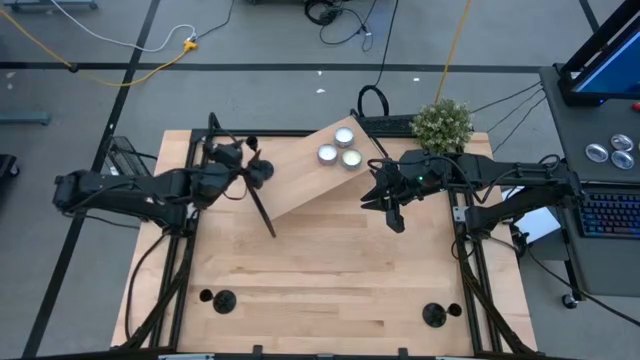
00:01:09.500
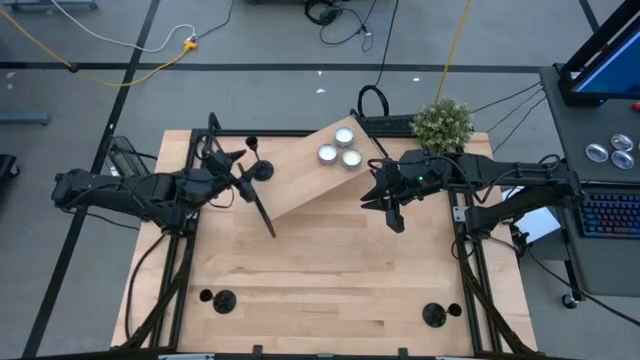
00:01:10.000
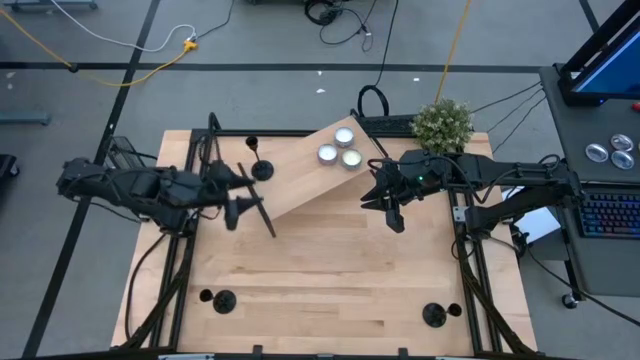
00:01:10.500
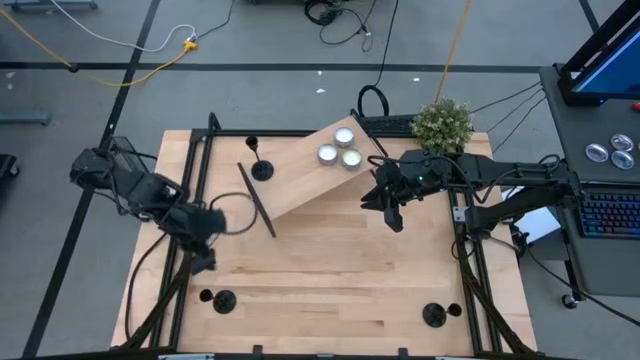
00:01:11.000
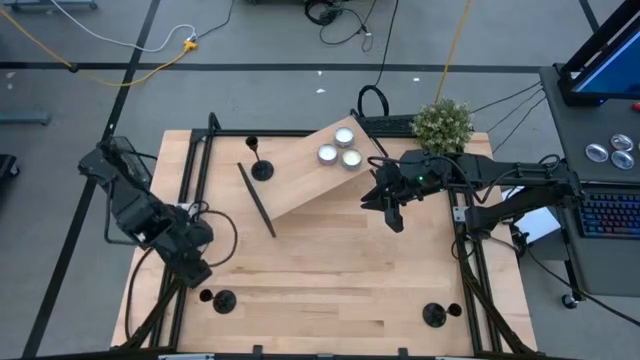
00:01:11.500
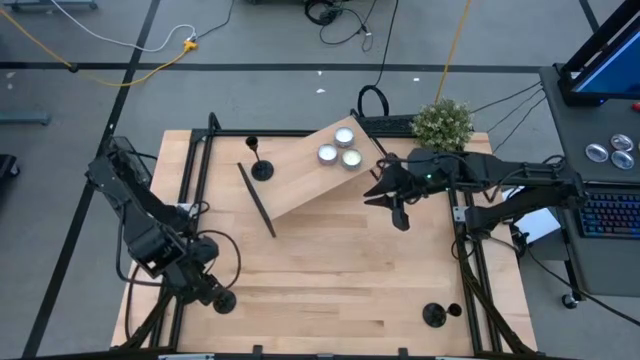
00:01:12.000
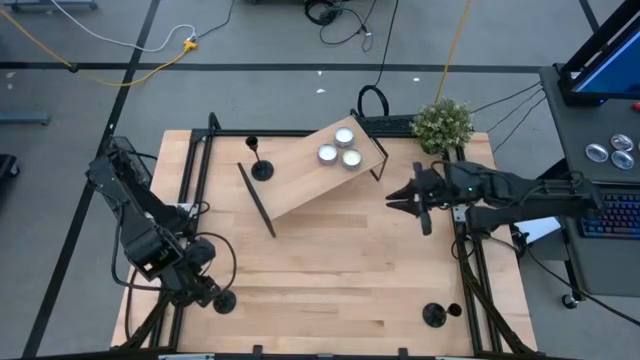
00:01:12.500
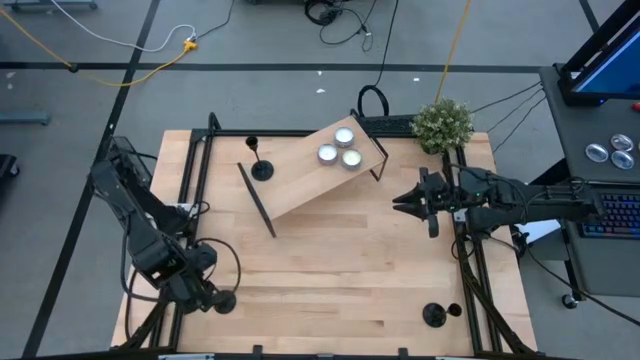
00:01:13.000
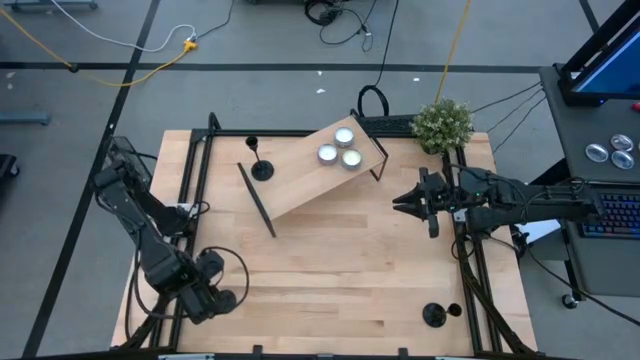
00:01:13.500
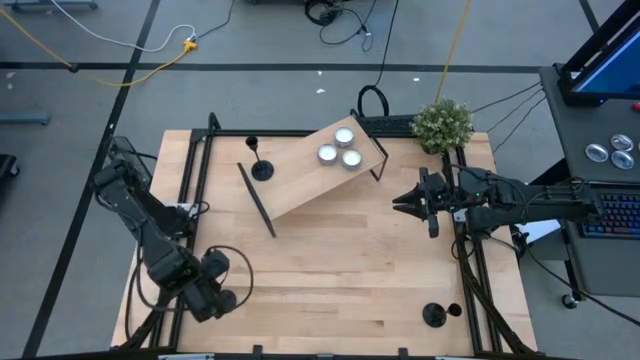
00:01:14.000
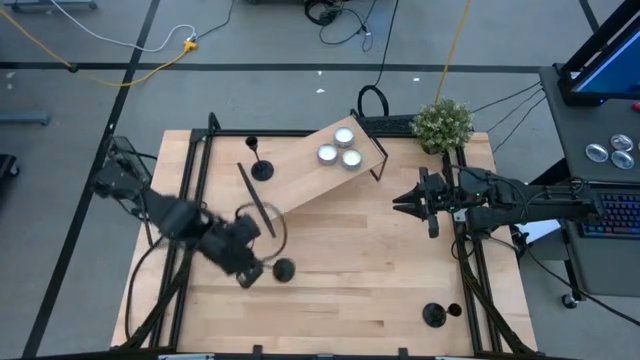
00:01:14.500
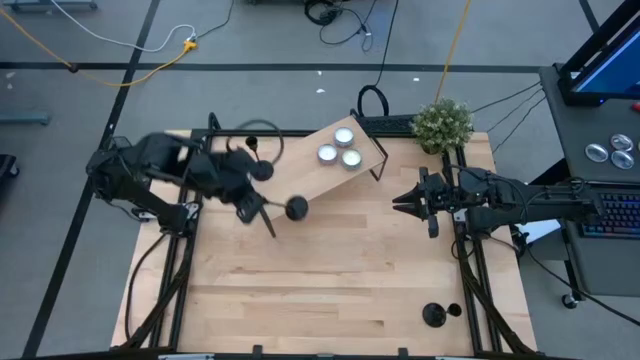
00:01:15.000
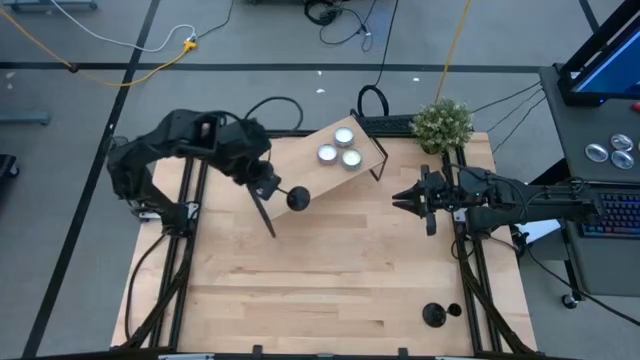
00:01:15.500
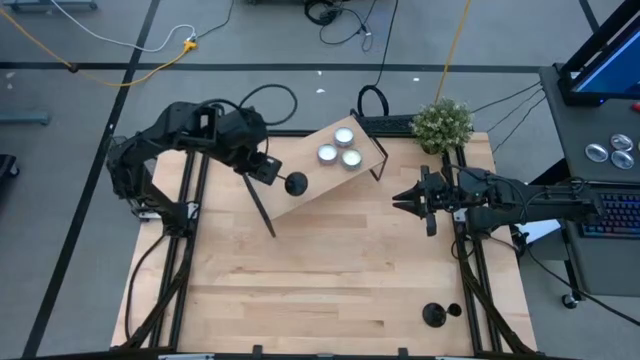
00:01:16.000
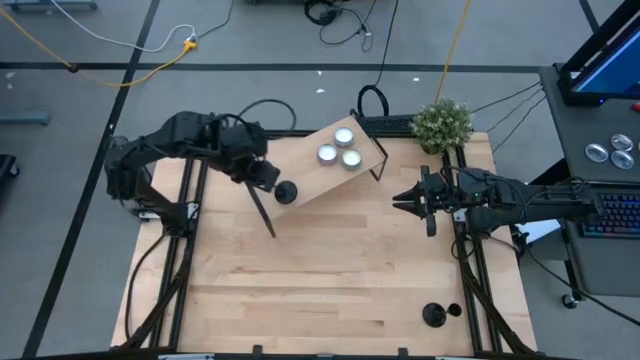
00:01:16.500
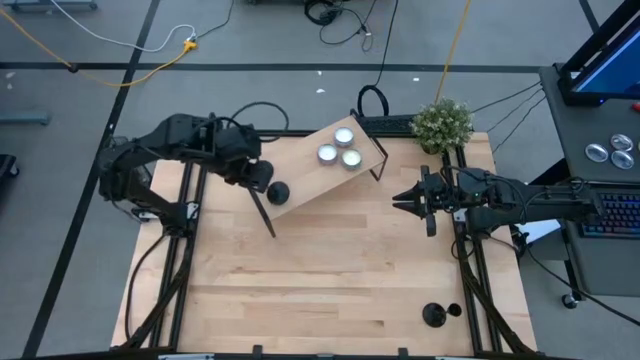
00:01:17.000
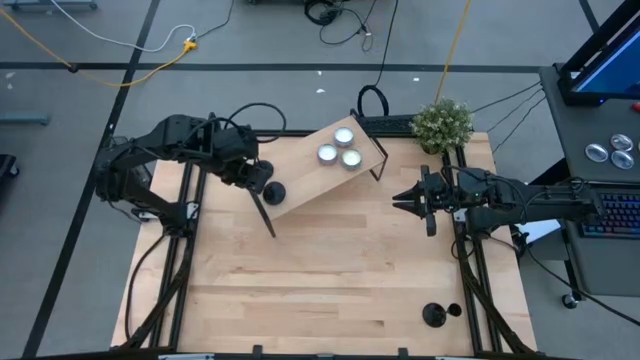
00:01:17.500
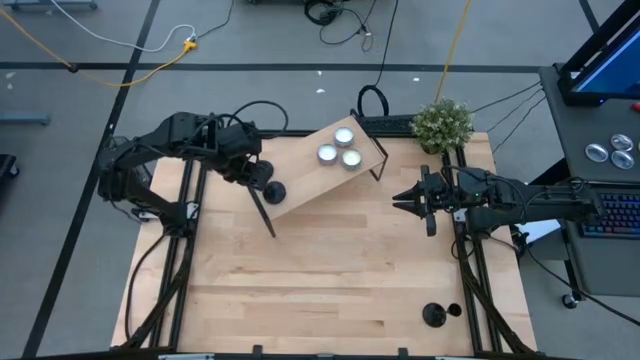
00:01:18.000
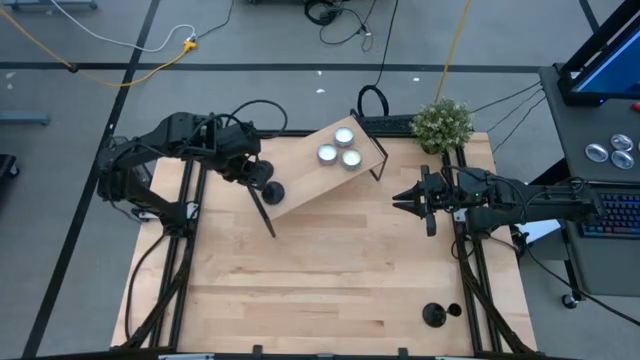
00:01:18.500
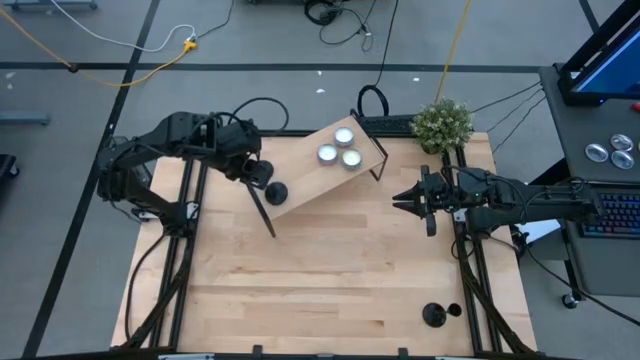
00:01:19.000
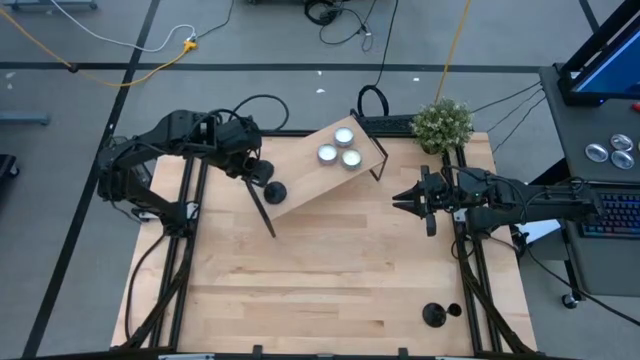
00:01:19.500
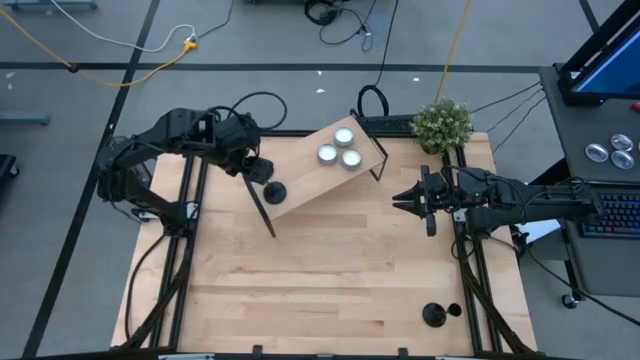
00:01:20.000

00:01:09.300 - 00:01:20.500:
Task: Pick & Place candle stick holders
Put the left black candle holder on the shelf
